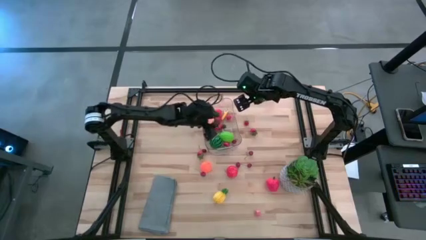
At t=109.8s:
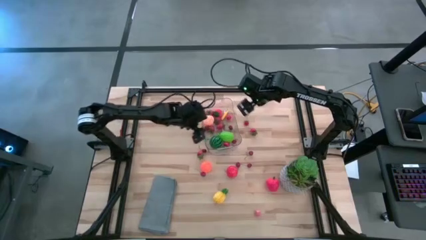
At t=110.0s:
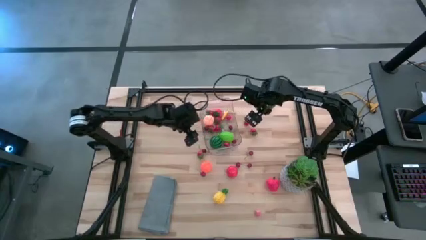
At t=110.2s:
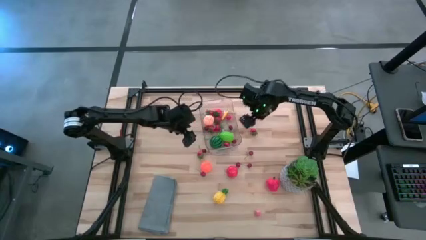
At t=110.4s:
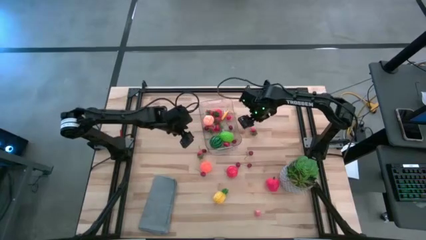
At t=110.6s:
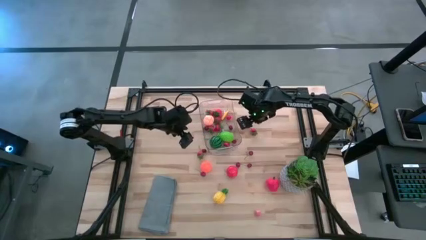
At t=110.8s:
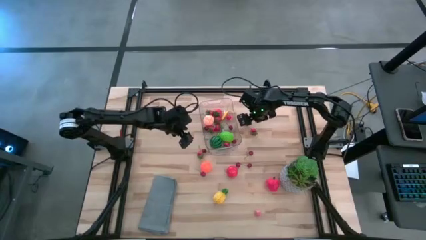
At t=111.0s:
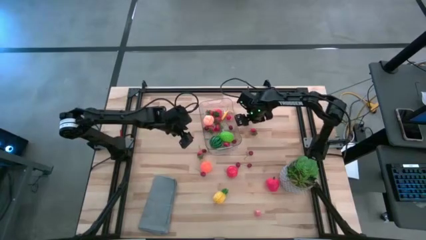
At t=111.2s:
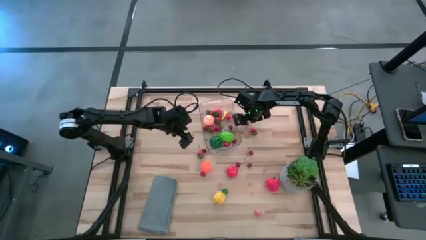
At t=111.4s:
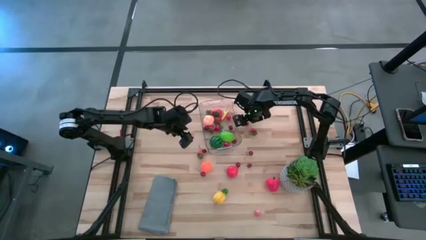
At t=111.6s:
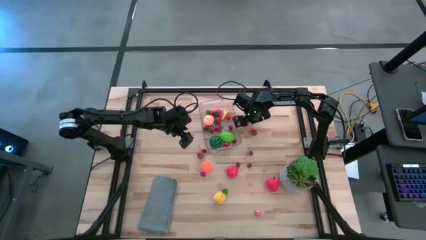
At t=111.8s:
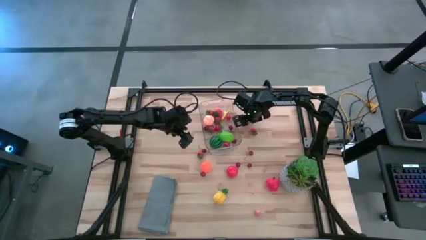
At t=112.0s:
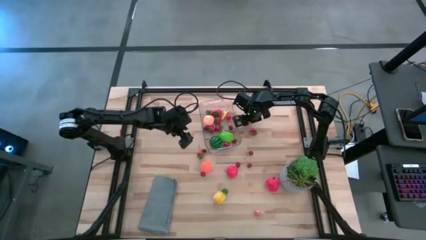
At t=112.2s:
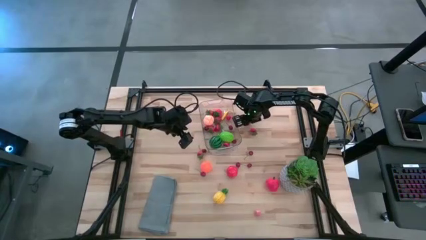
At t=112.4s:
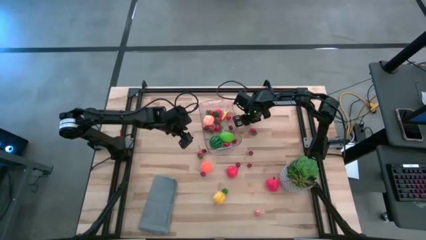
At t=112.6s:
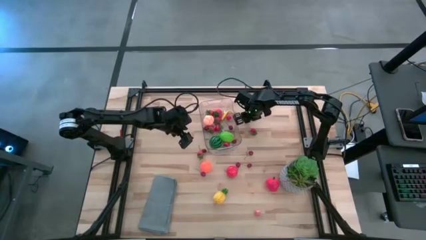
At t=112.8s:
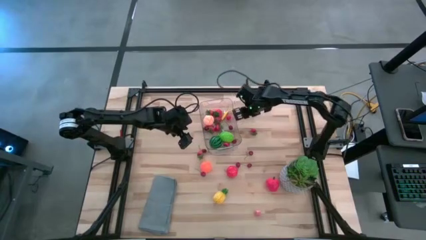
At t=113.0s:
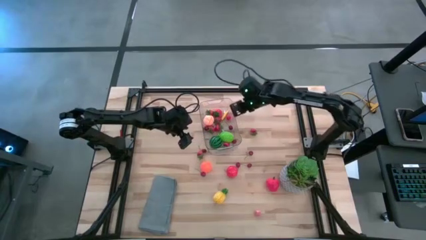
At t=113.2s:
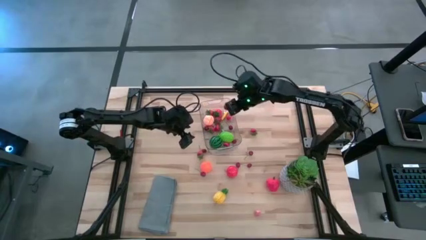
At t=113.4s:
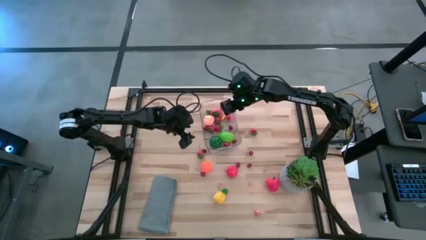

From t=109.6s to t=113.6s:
Task: Pick and placing Produce into tupperware
Put the red strawberry into the transparent container

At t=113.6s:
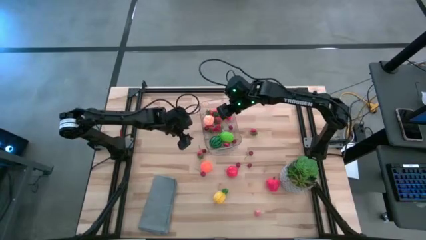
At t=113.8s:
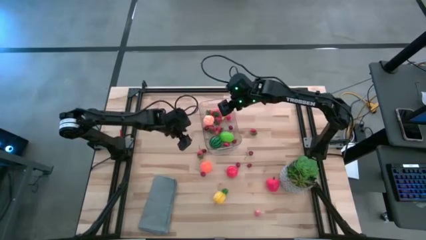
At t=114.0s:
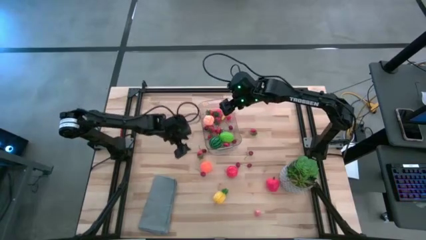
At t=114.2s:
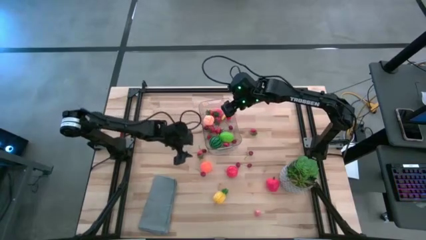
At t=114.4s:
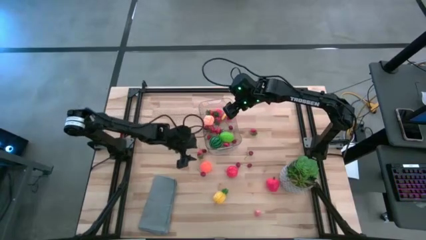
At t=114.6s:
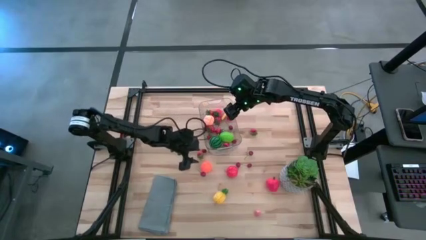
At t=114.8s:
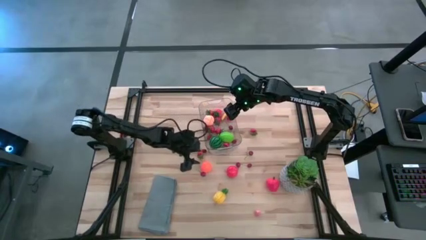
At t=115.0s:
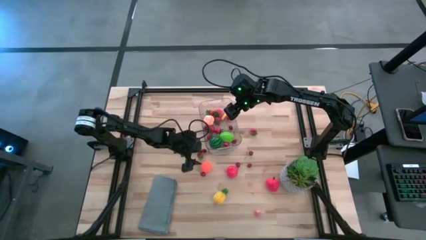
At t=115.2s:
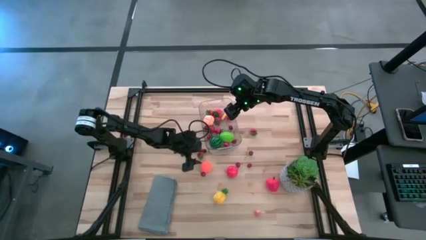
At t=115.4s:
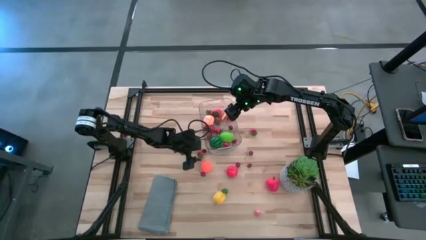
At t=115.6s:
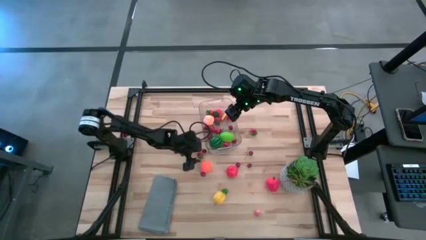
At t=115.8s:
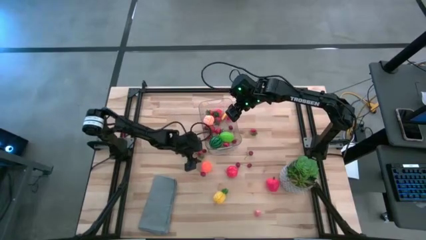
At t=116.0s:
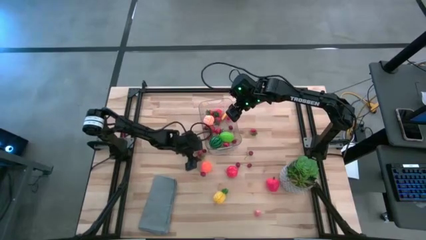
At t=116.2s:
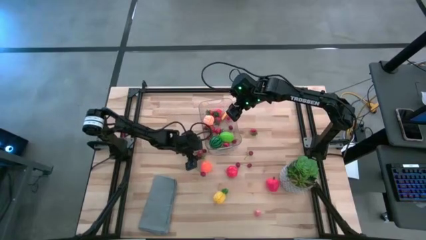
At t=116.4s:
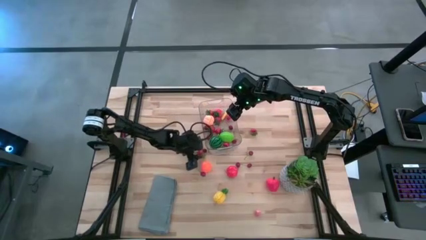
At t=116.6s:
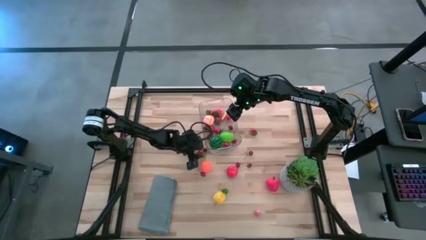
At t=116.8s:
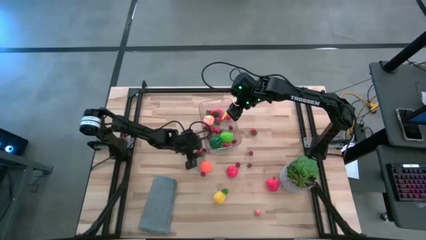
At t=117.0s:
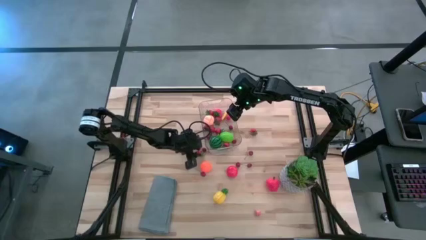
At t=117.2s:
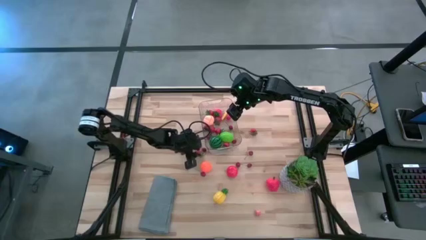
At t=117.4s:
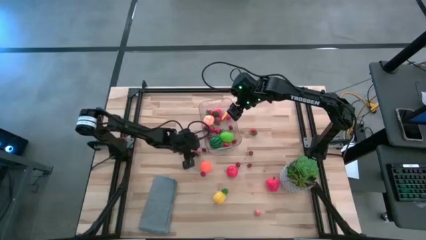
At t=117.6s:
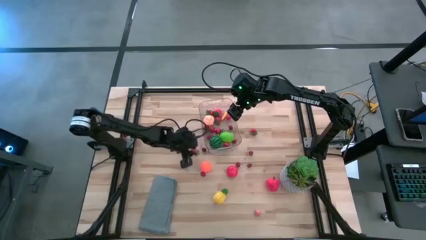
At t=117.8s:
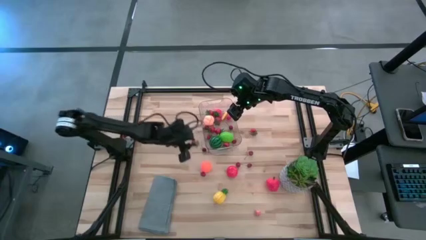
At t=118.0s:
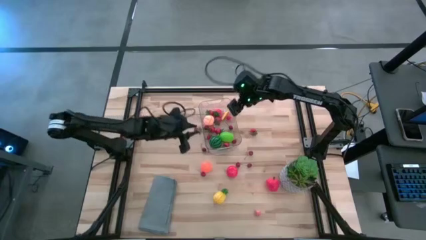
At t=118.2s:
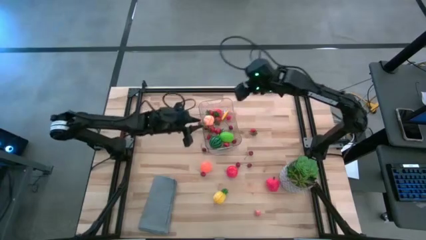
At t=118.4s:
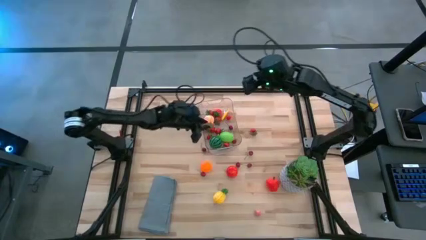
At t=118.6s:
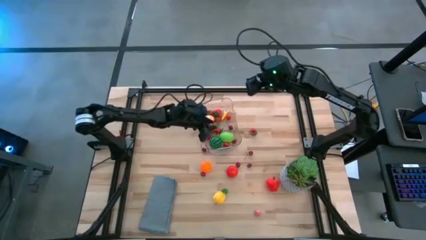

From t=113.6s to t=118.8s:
Put the red strawberry into the transparent container

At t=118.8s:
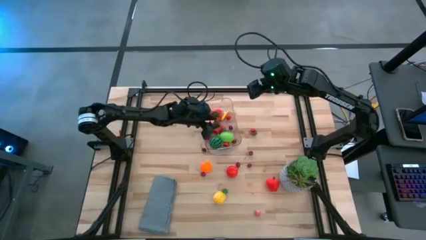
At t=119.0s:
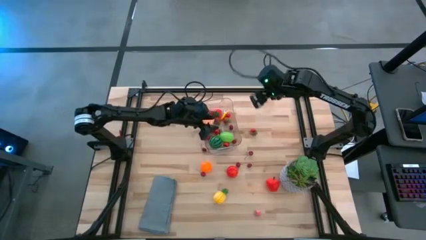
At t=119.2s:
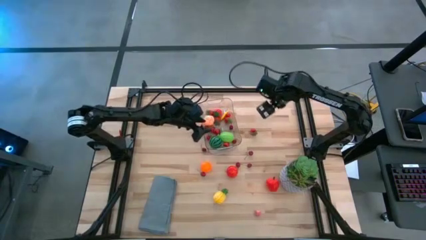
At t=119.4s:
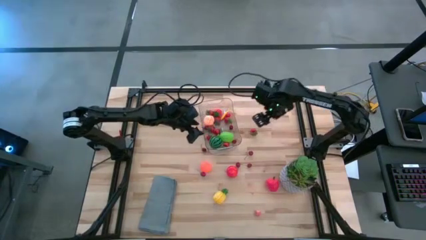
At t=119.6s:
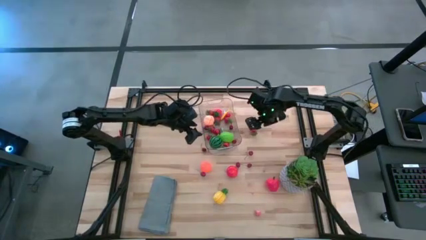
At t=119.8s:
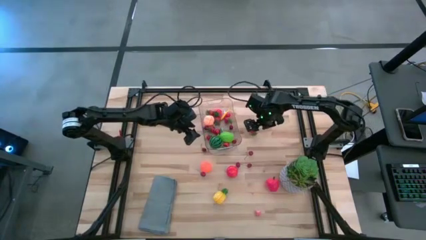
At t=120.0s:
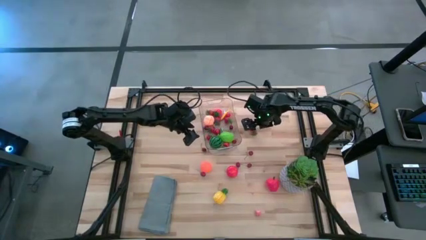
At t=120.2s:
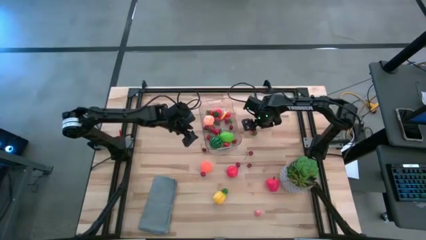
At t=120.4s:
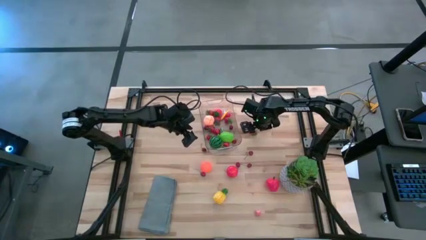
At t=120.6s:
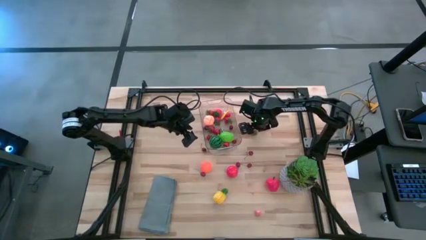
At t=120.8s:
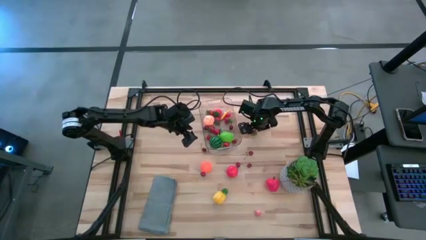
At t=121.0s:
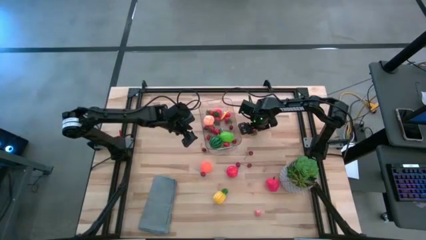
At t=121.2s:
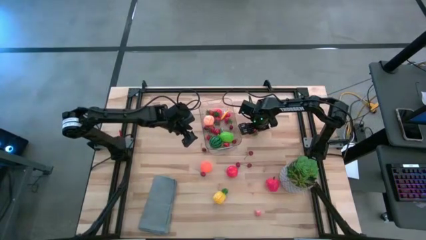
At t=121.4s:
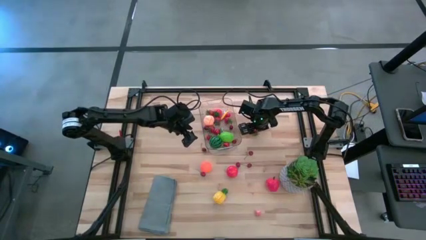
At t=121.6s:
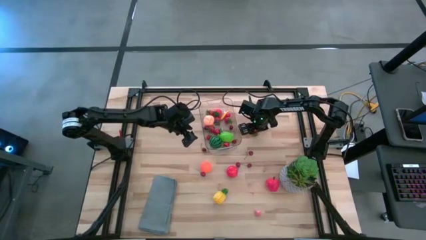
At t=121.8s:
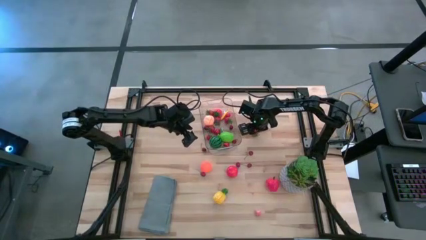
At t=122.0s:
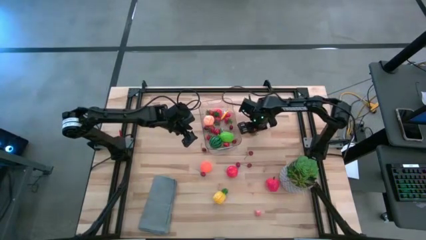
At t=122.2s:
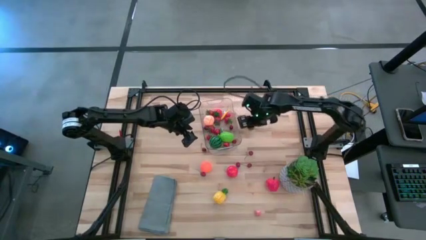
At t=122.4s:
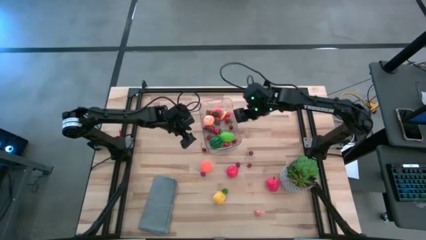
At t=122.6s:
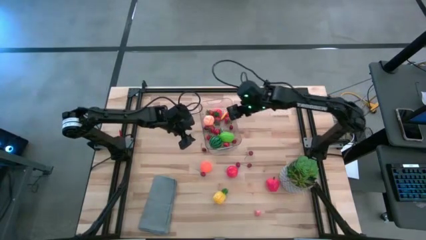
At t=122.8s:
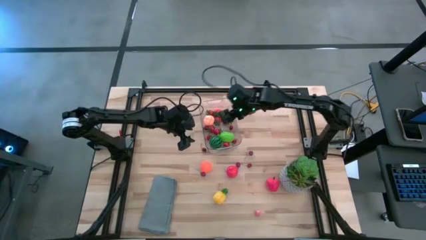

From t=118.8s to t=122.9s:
Put the red strawberry into the transparent container

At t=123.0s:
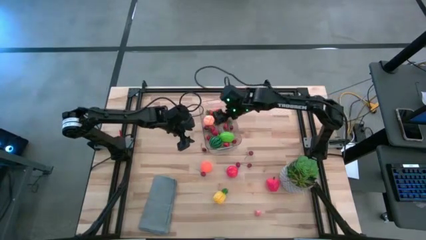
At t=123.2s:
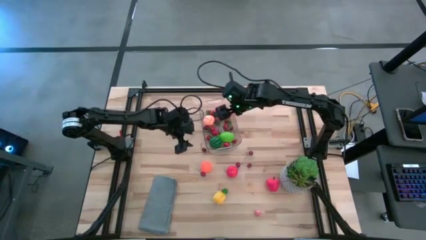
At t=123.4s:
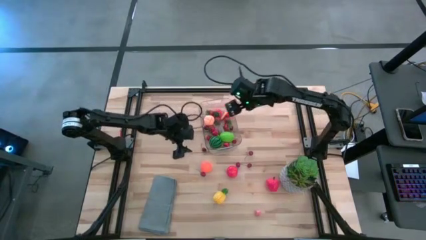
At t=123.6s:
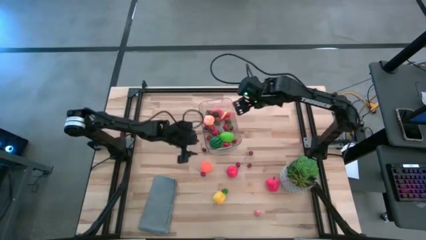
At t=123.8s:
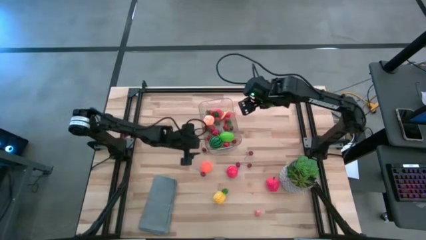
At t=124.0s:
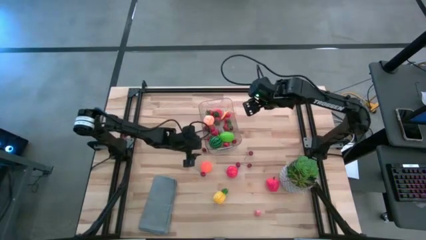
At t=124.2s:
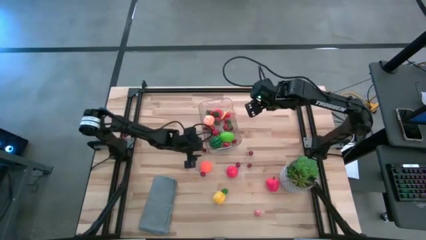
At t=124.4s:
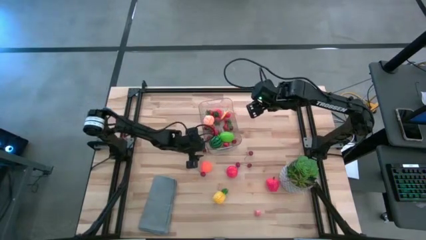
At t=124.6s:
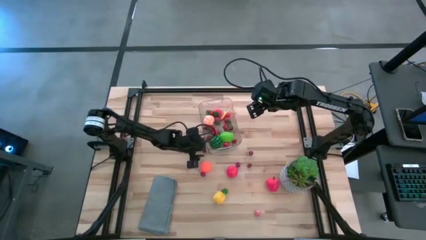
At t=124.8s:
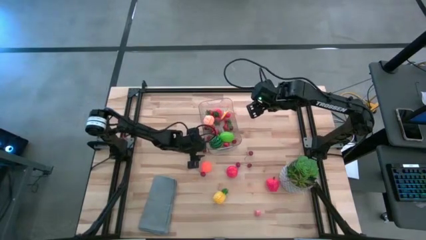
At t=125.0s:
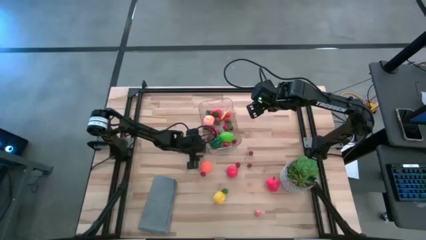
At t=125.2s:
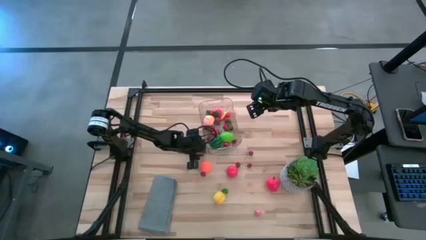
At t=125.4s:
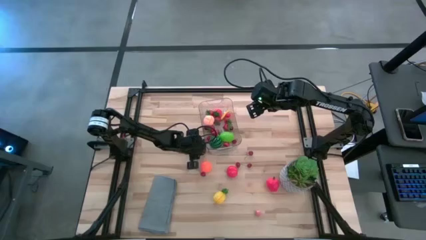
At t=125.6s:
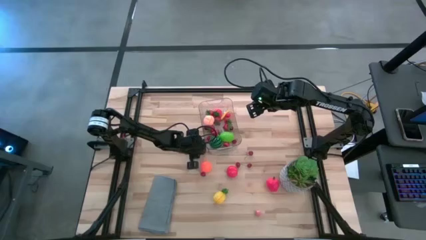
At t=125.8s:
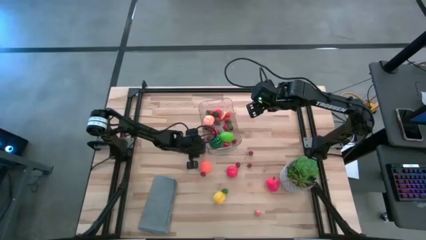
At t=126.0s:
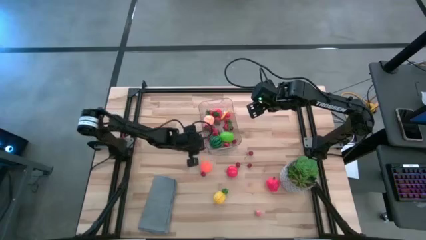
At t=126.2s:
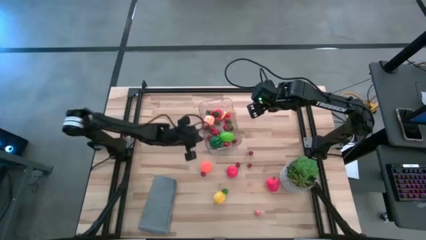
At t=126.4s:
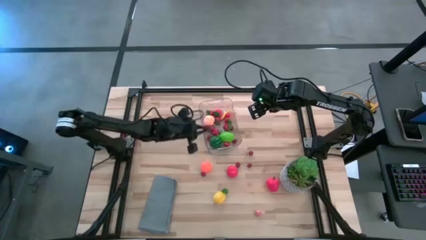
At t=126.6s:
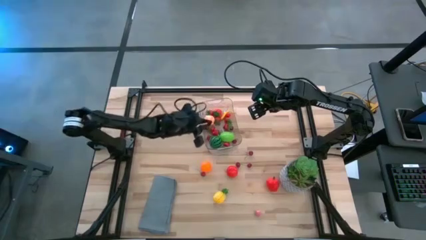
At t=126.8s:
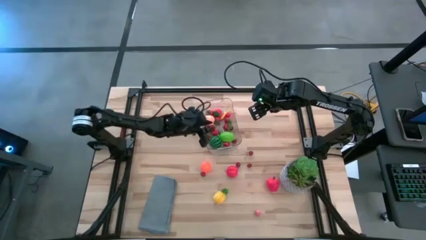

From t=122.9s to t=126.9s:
Put the red cherry into the transparent container
